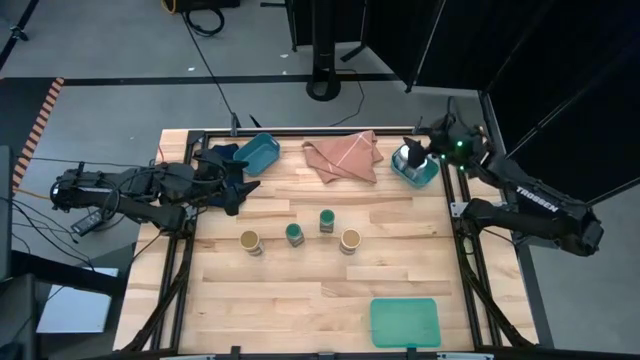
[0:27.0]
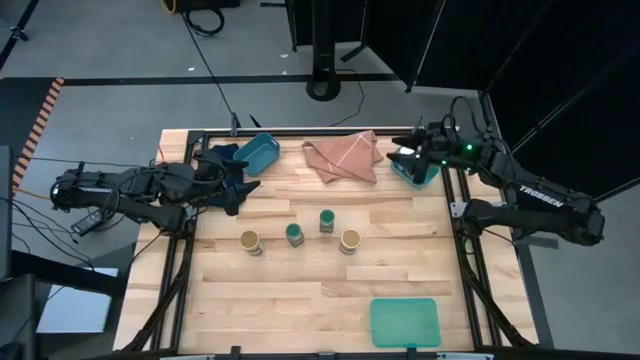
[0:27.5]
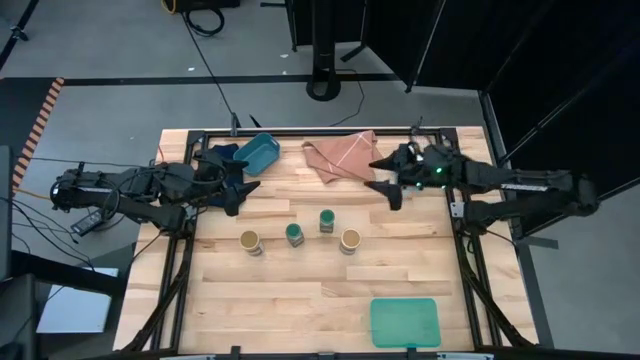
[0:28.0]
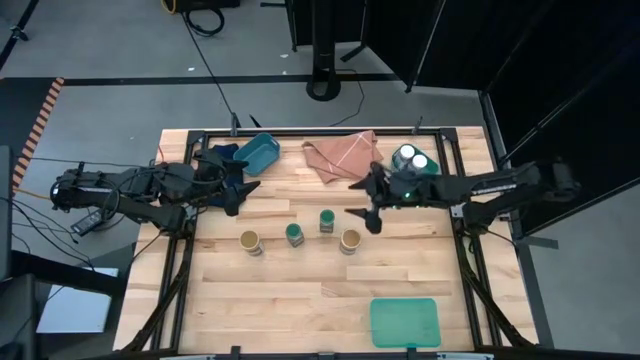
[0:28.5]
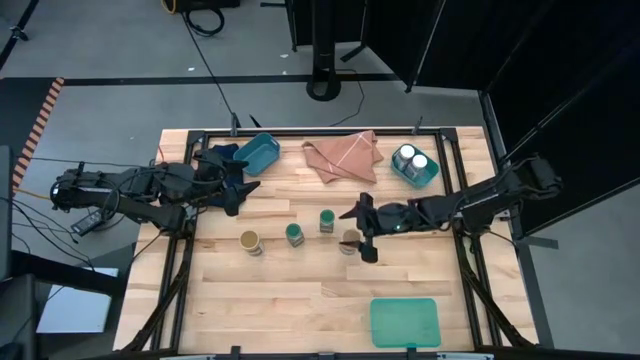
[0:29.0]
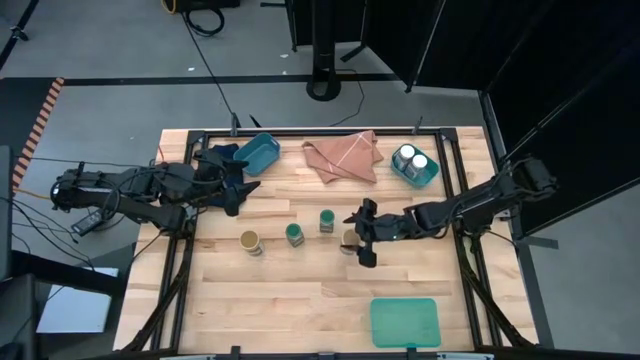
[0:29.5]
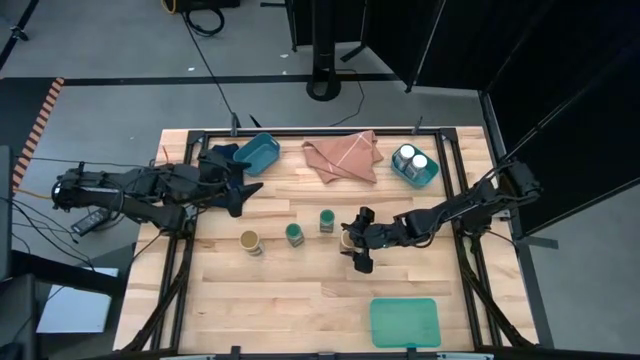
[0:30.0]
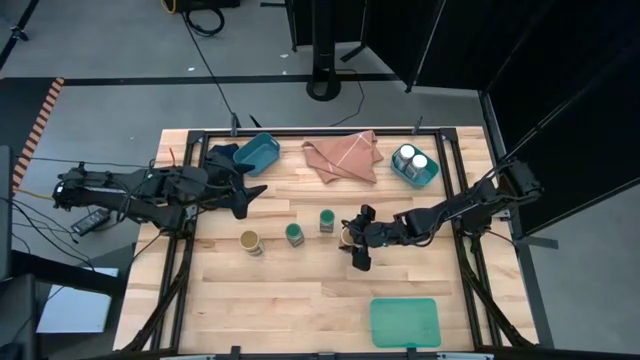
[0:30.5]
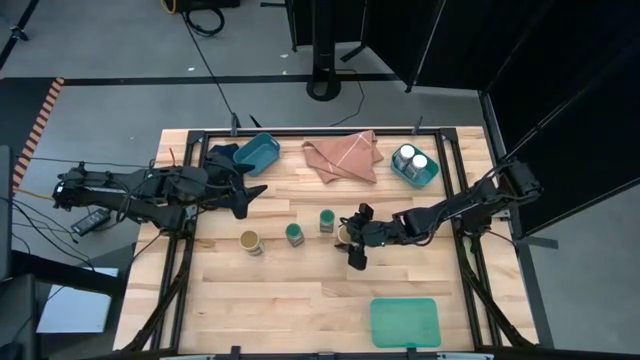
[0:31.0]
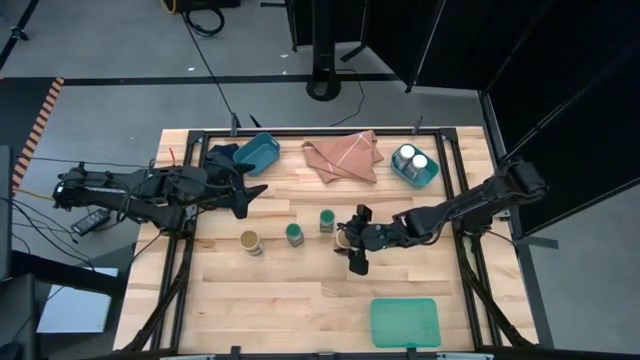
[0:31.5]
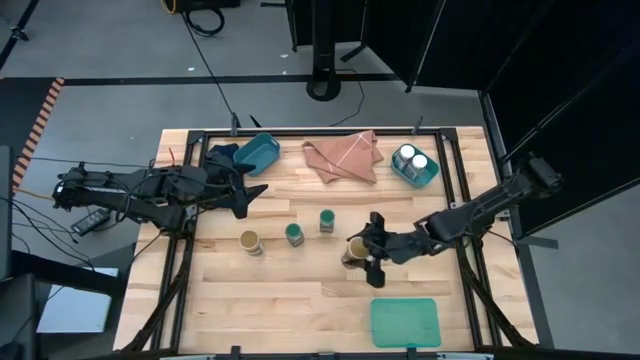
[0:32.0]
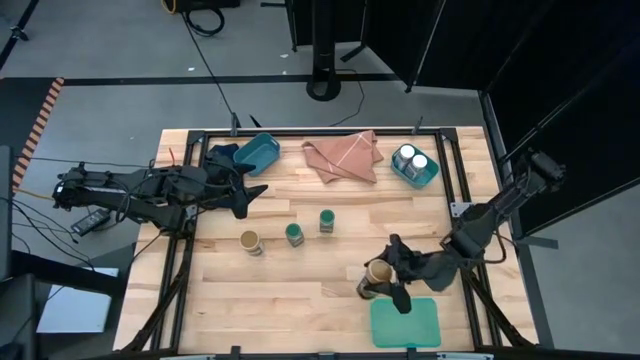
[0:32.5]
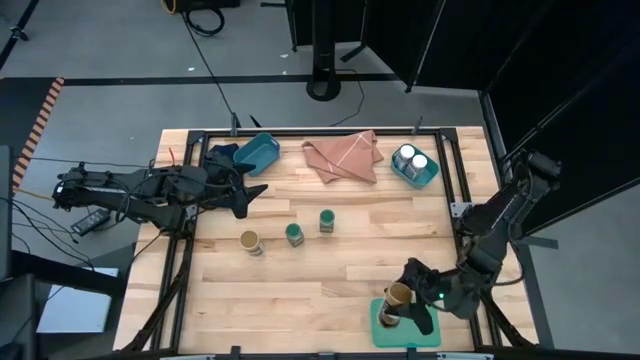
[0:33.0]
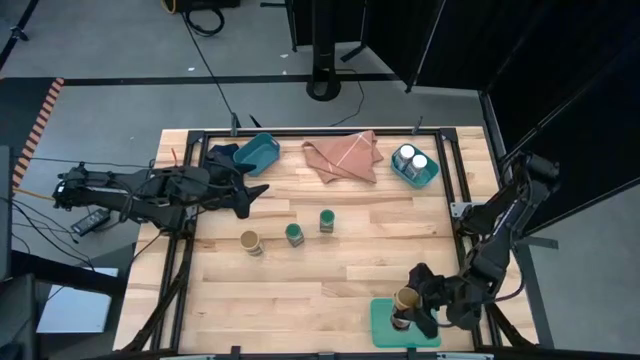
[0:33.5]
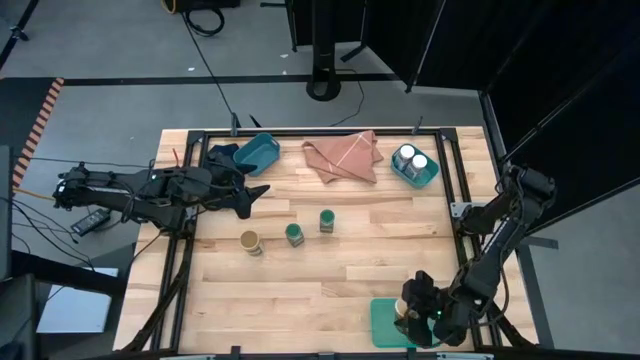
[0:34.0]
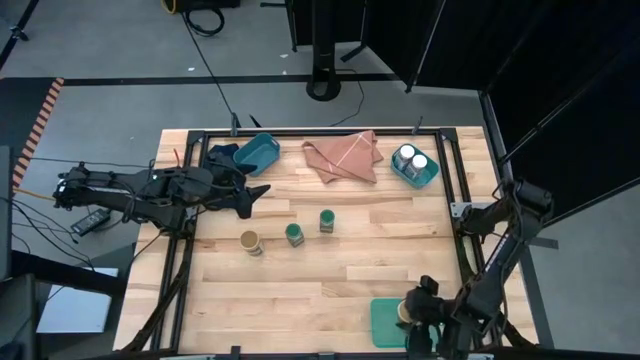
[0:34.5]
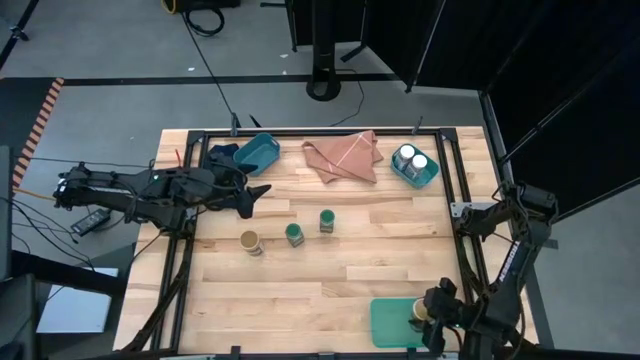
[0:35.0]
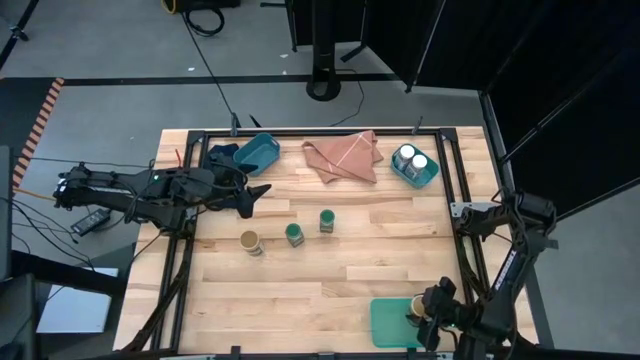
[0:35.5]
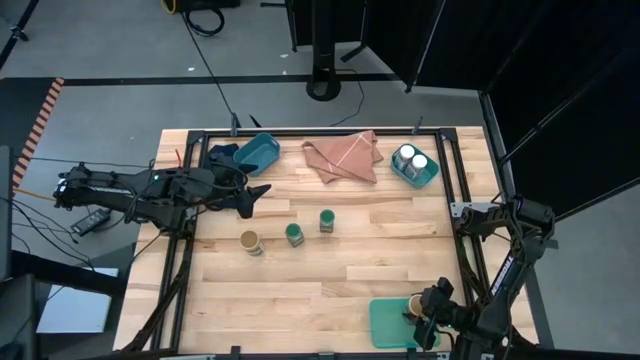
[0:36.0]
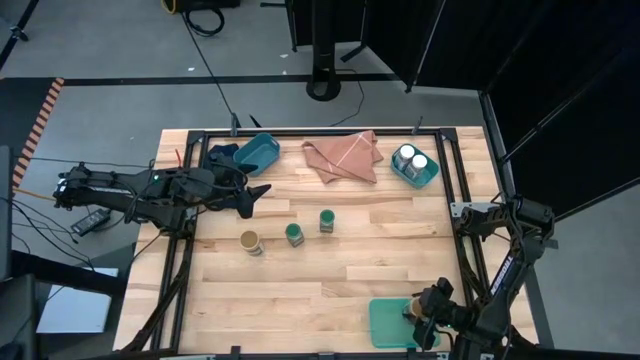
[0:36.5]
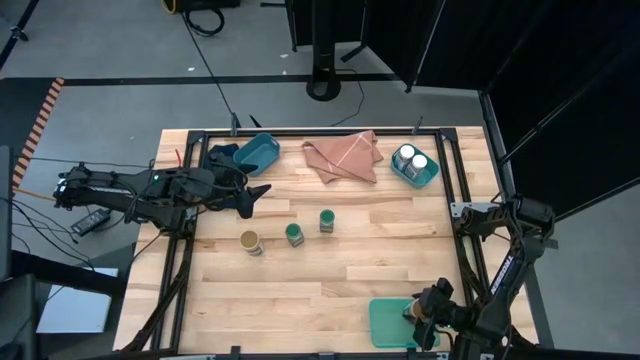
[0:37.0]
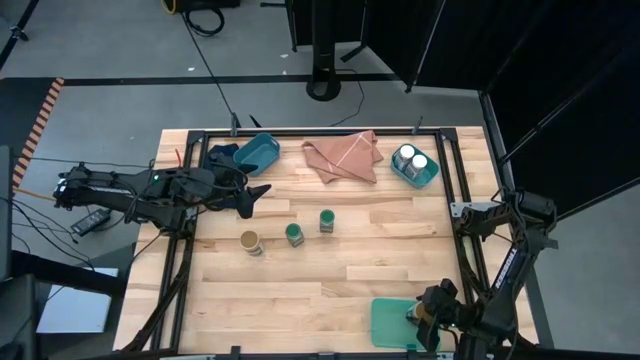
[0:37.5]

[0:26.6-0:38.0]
Task: Sort spices by type
Put the right gold seasoning bottle into the light green bin

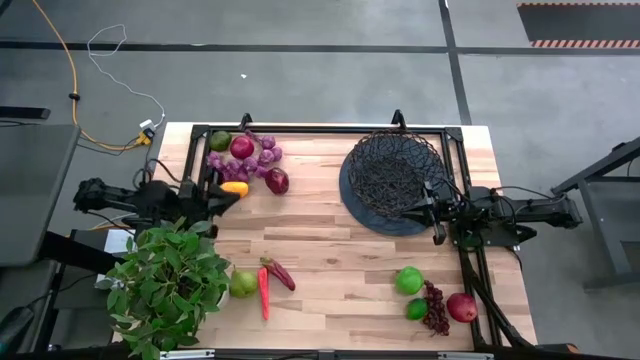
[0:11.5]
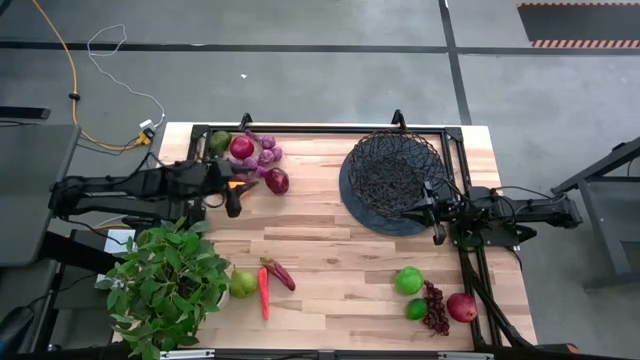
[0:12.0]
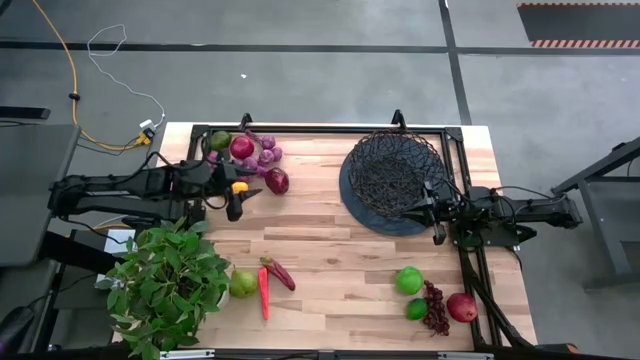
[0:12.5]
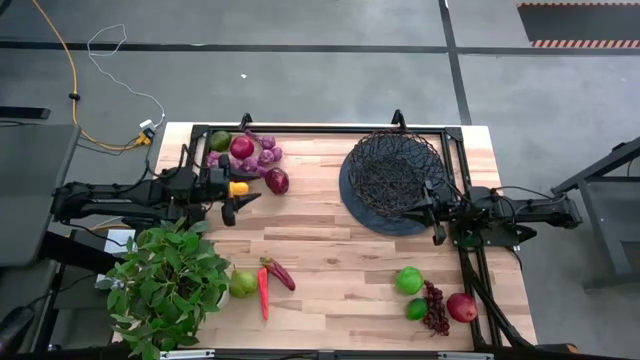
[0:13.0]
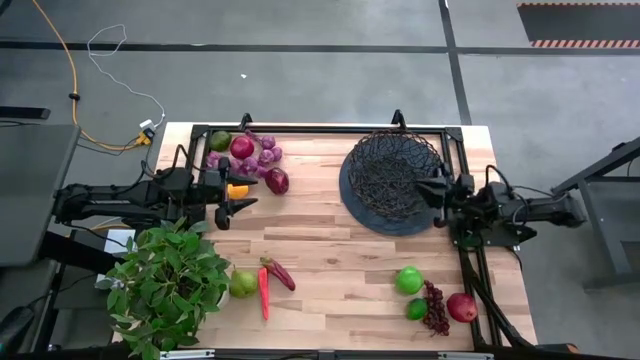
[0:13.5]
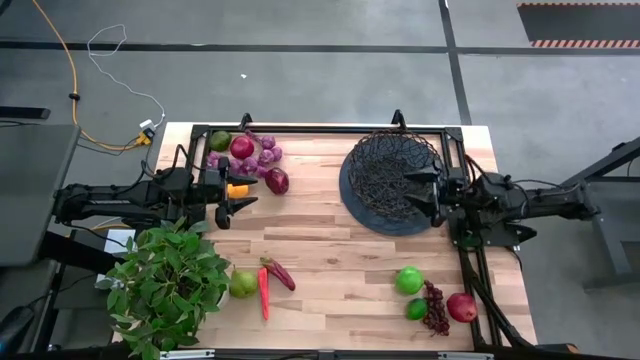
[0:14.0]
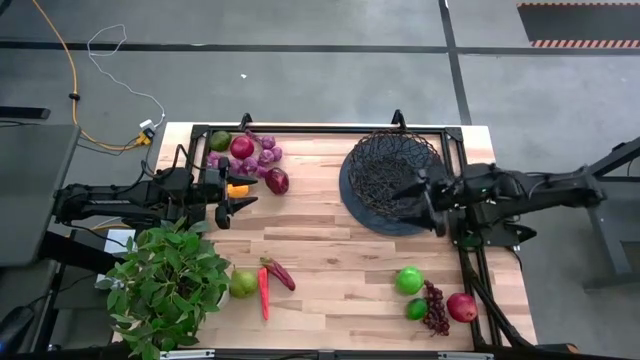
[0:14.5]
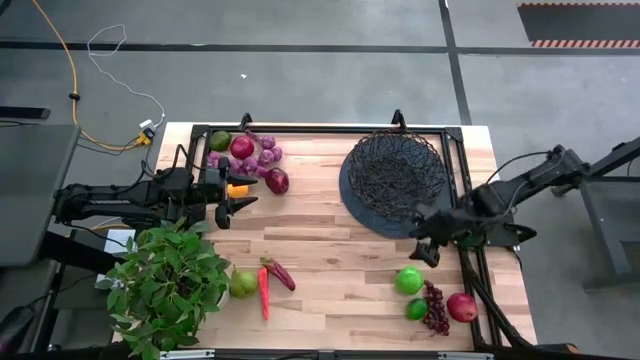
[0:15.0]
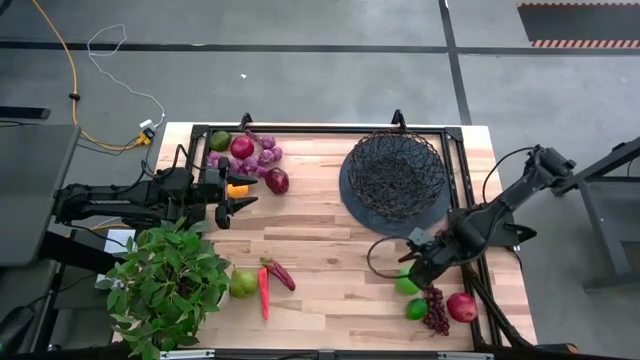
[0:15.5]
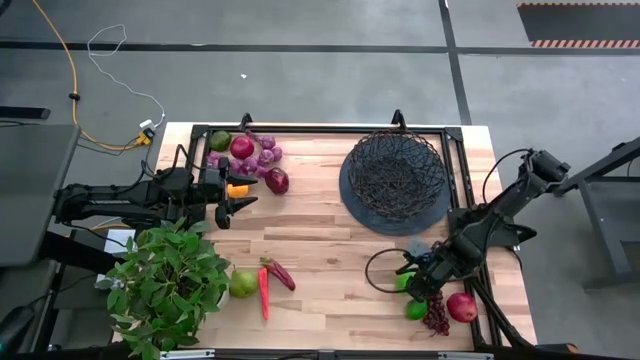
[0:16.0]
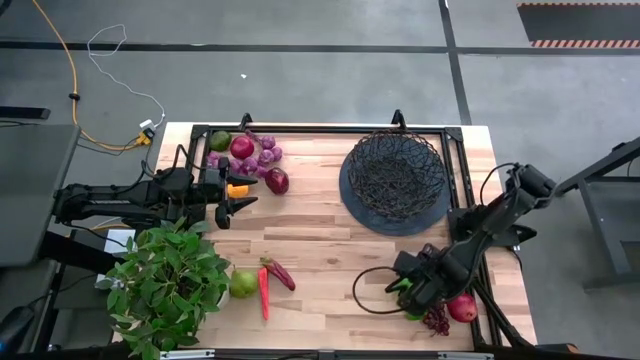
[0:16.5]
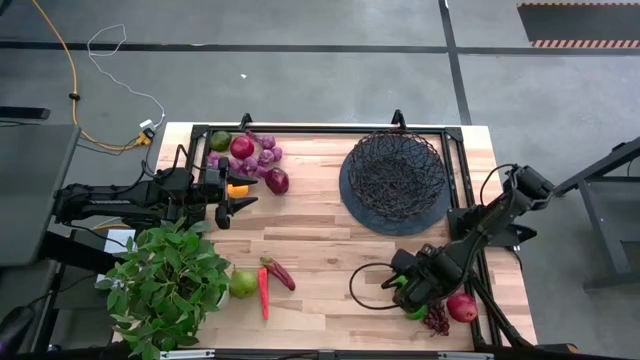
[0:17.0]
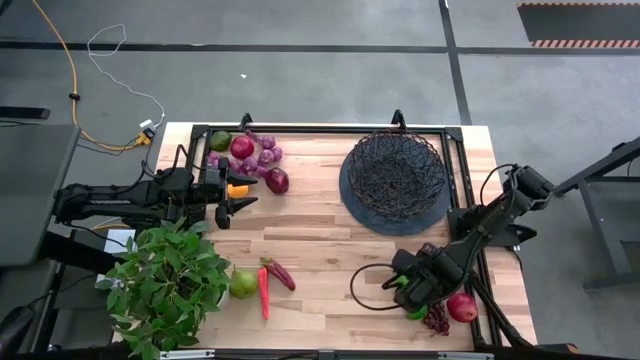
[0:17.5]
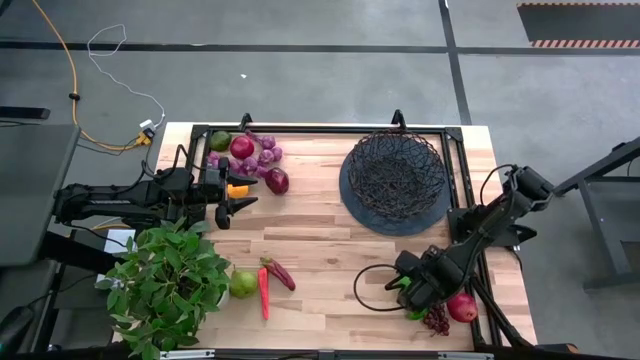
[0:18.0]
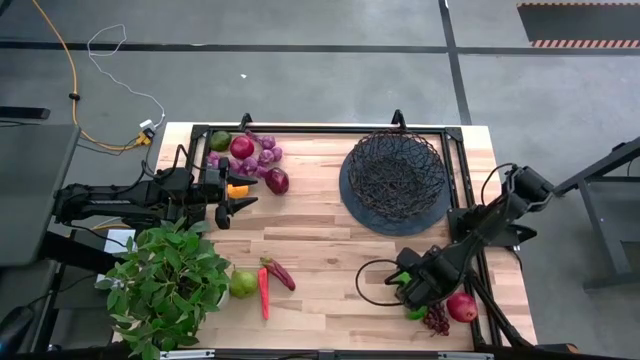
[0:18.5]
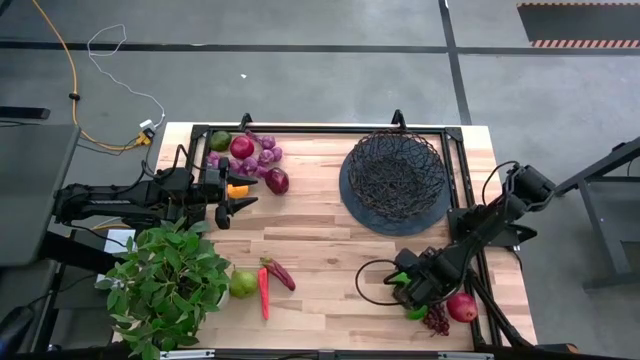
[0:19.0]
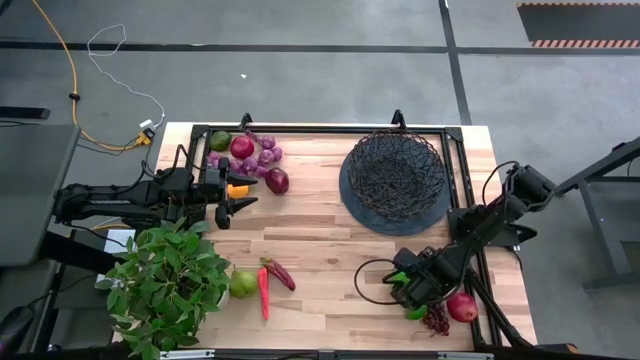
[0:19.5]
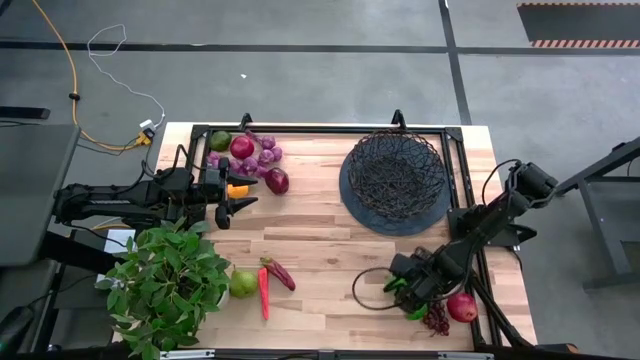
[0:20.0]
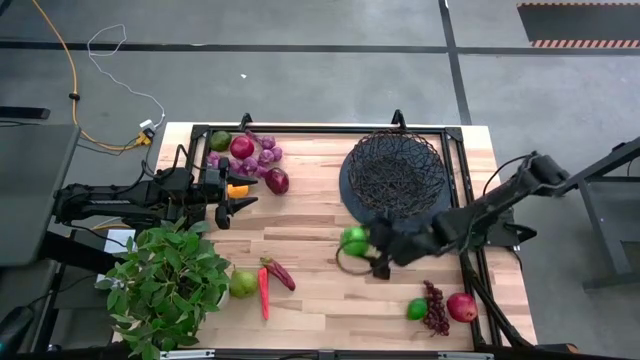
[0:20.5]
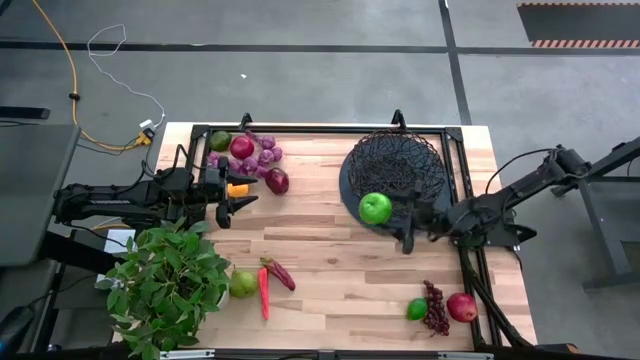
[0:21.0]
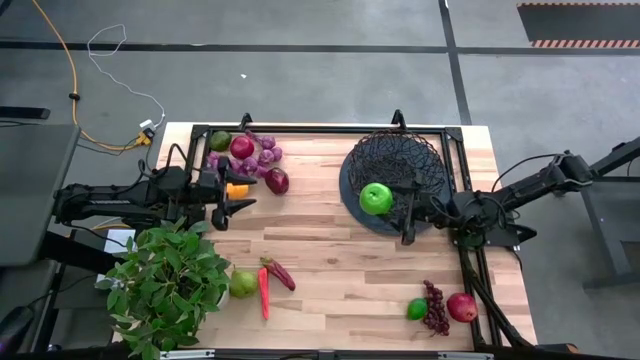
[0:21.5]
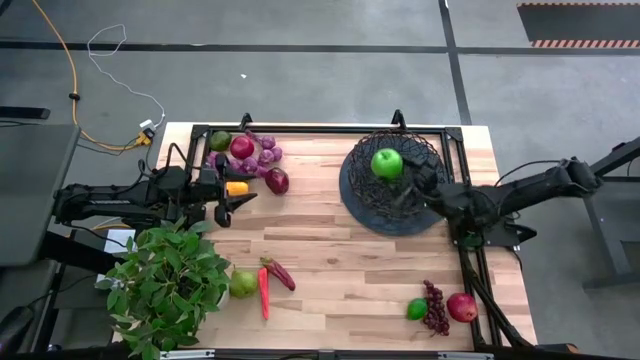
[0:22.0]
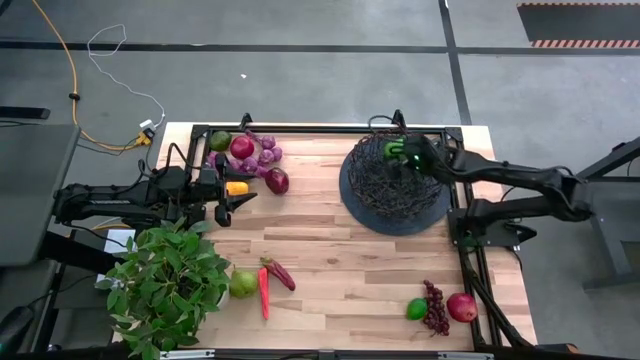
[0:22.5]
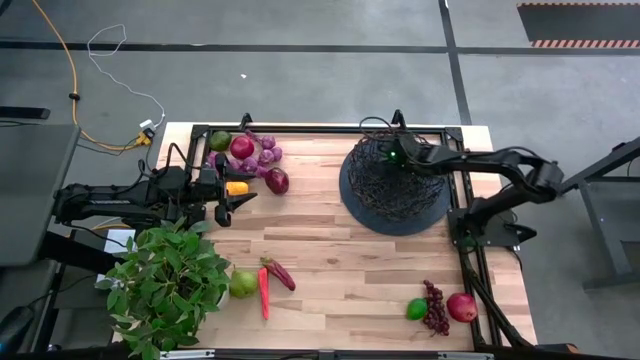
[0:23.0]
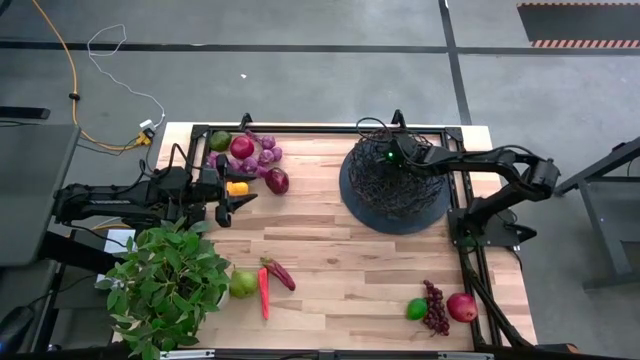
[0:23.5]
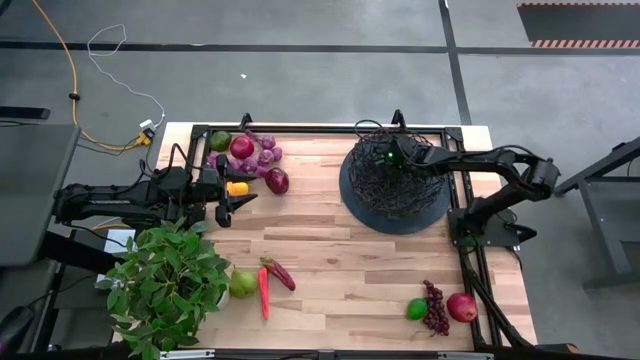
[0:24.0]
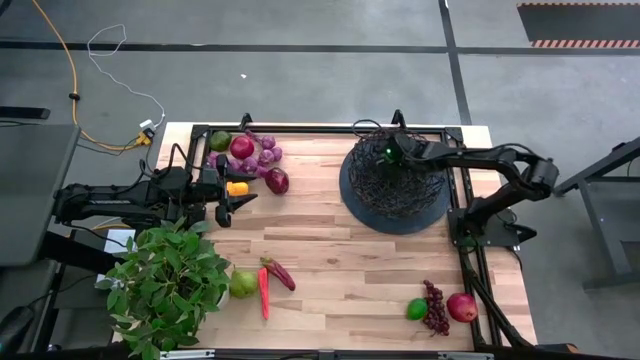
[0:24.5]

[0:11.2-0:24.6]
Task: Build produce basket
Put the green apple into the black wire basket
